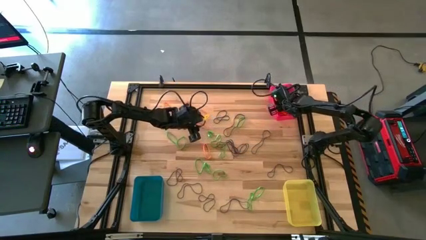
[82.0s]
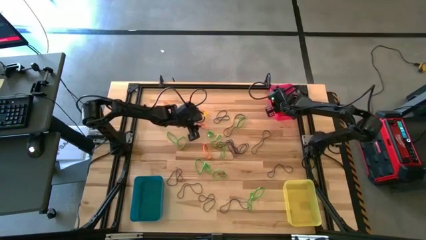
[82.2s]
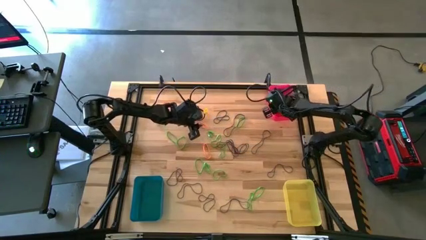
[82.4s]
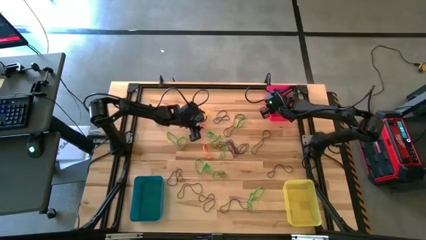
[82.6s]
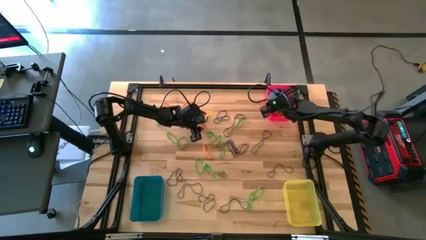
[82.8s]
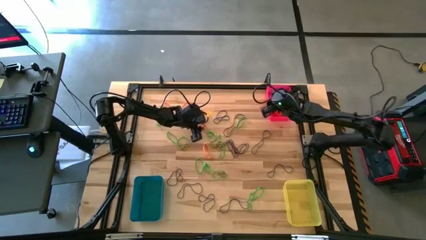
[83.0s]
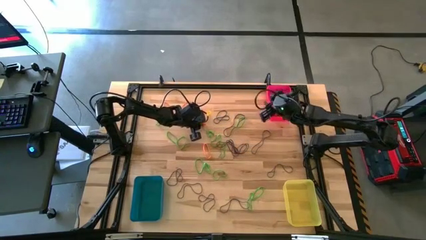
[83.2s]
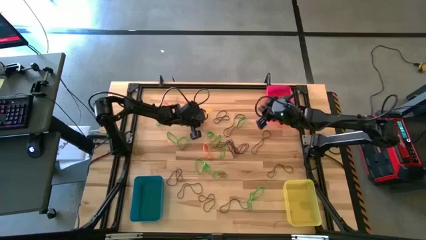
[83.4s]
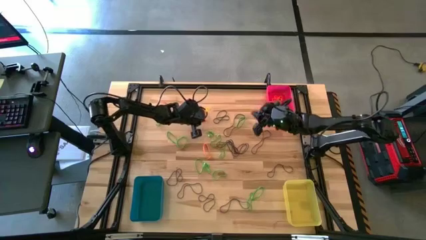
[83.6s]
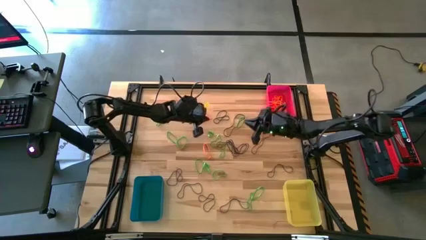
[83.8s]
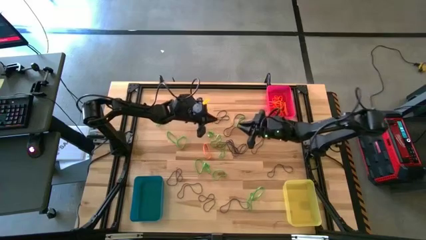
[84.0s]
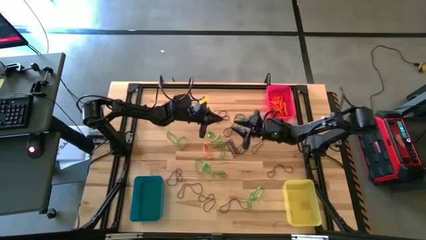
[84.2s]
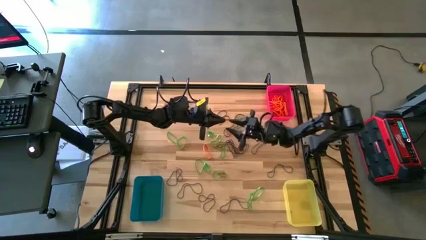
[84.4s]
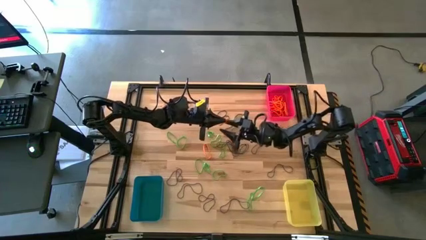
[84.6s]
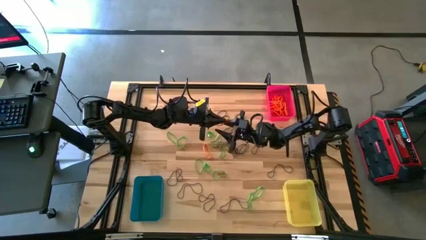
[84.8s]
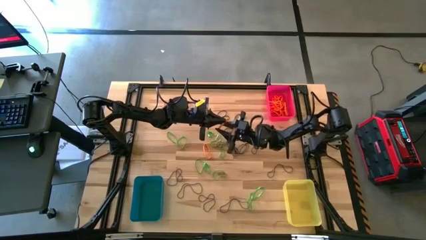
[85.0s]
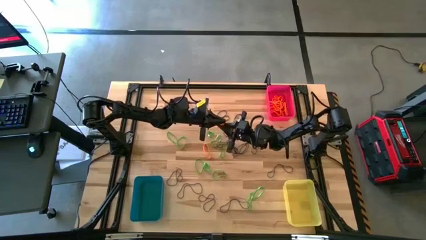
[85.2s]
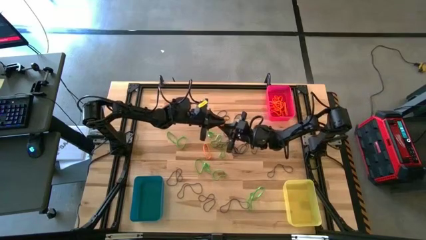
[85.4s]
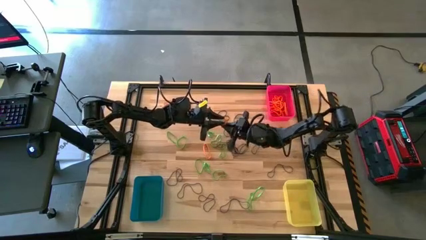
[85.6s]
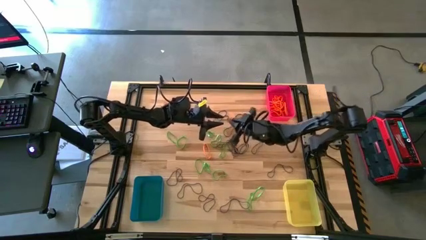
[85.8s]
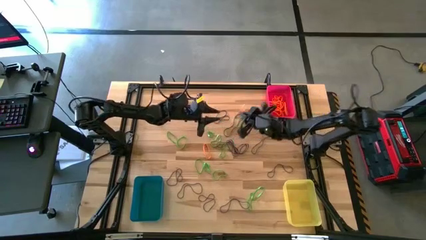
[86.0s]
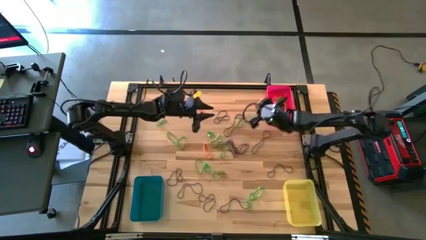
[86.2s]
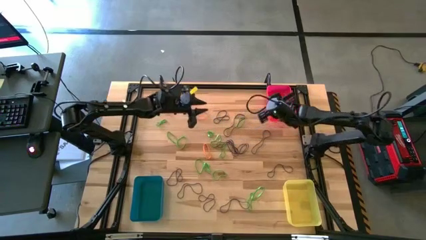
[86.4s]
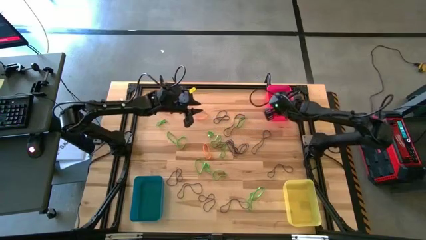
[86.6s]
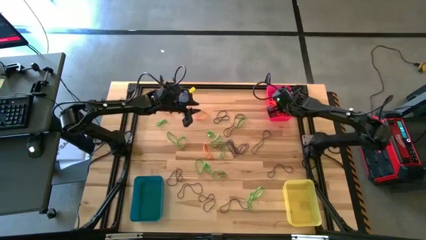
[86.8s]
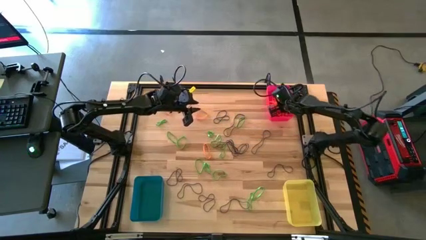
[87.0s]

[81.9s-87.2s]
Task: Sort rubber bands into baskets
Put the orange rubber band into the red bin

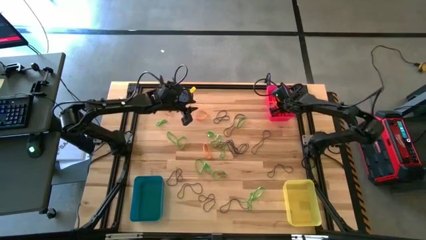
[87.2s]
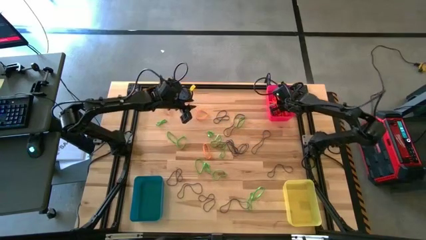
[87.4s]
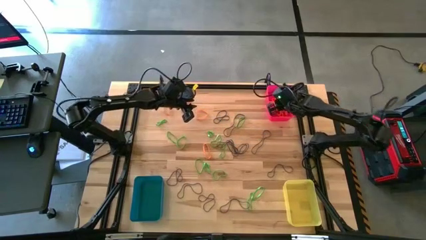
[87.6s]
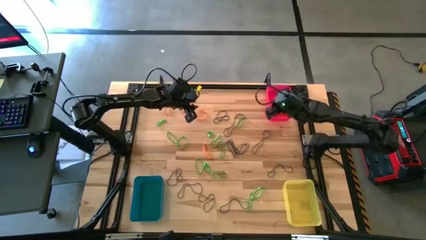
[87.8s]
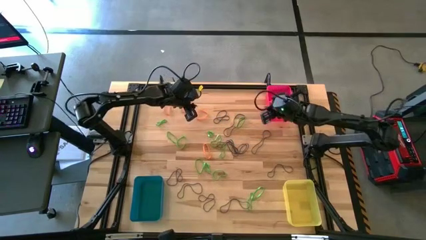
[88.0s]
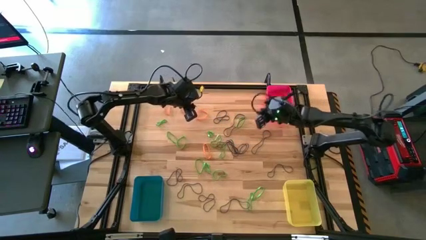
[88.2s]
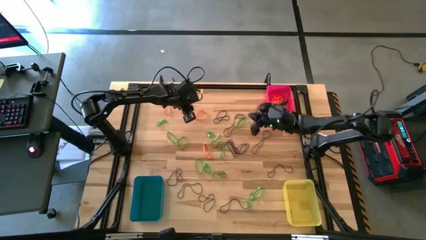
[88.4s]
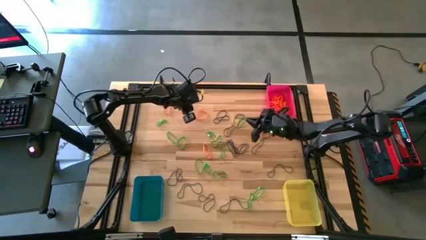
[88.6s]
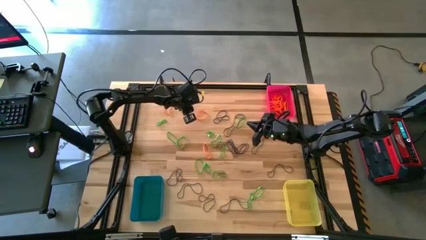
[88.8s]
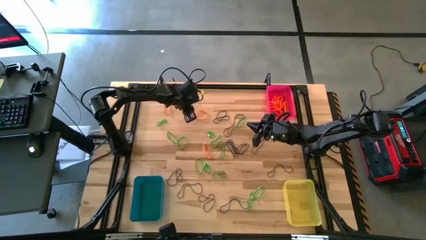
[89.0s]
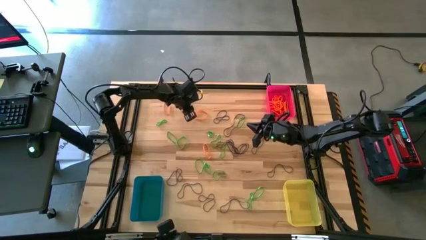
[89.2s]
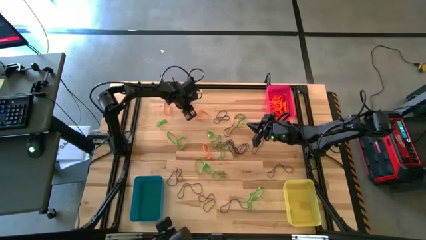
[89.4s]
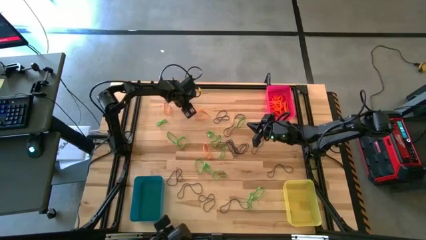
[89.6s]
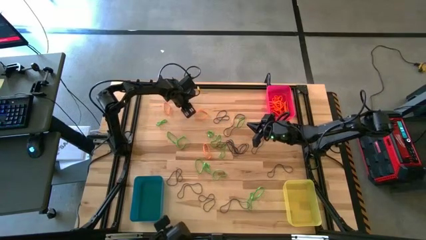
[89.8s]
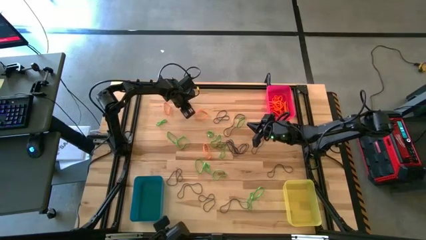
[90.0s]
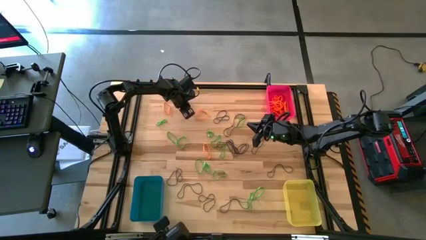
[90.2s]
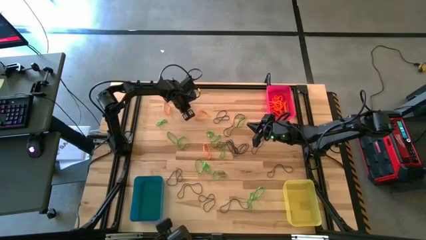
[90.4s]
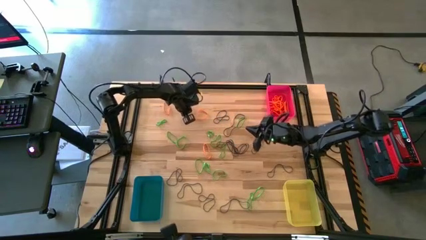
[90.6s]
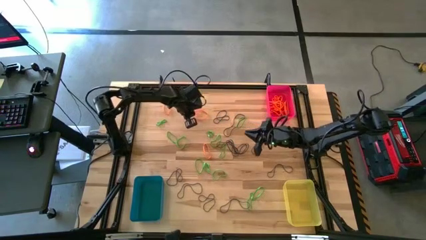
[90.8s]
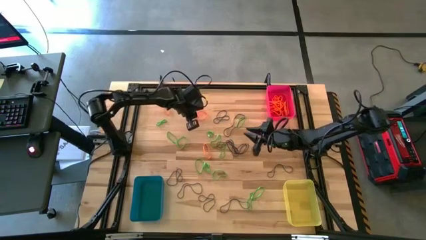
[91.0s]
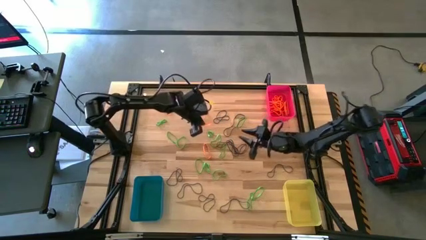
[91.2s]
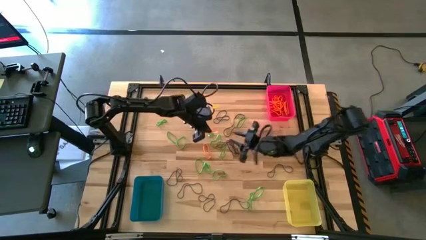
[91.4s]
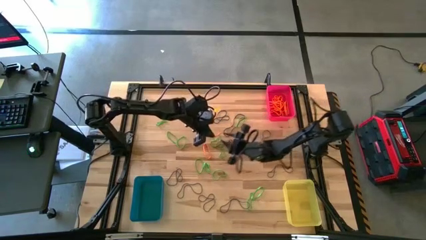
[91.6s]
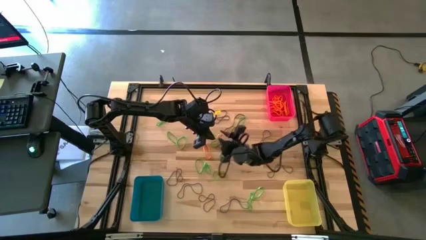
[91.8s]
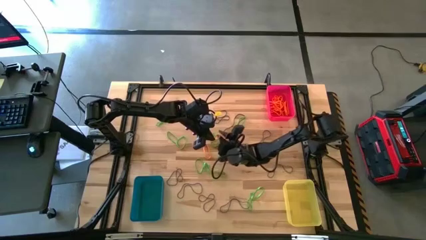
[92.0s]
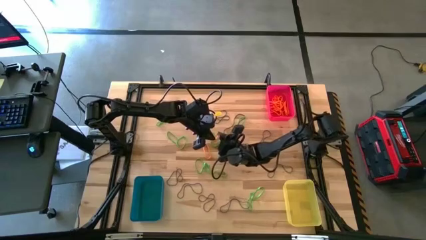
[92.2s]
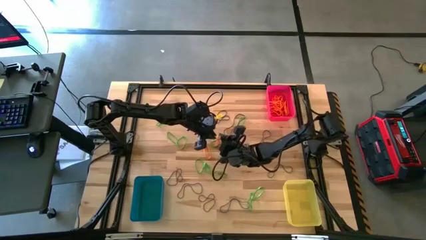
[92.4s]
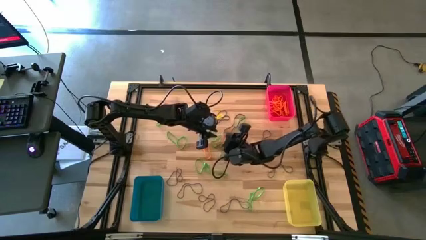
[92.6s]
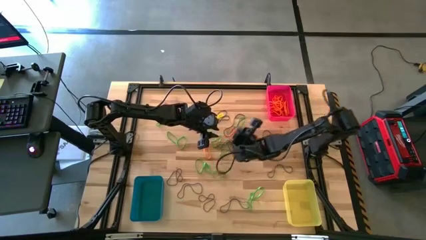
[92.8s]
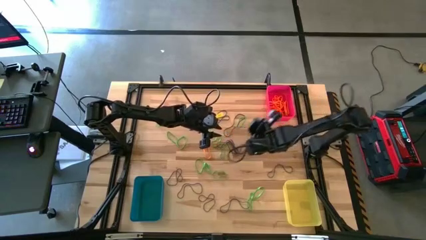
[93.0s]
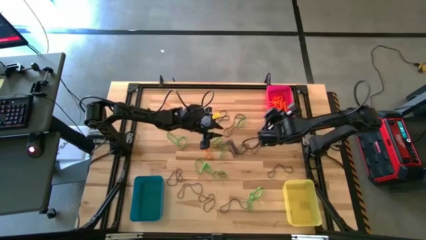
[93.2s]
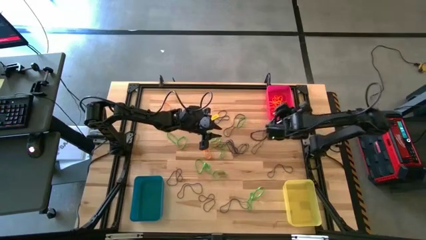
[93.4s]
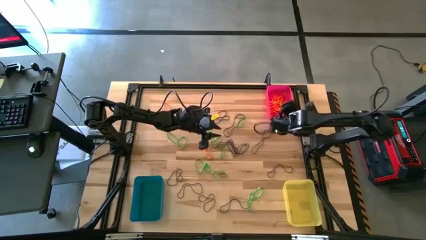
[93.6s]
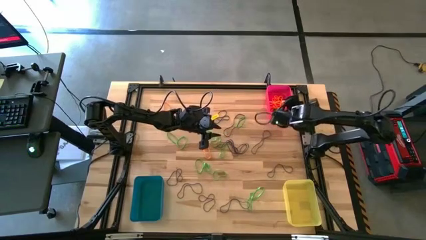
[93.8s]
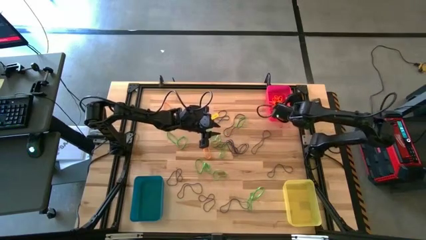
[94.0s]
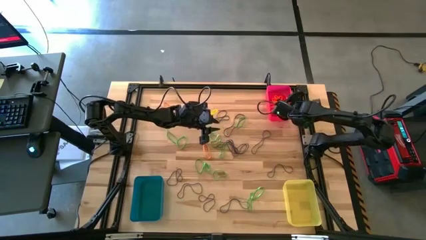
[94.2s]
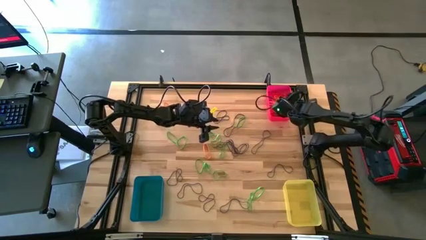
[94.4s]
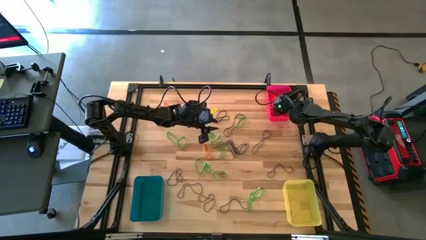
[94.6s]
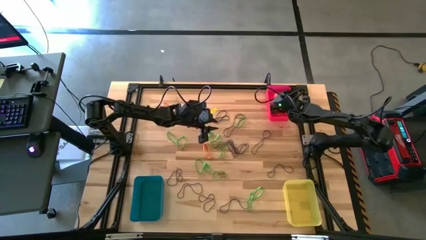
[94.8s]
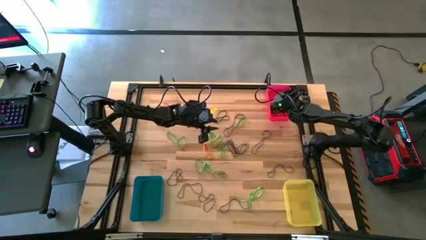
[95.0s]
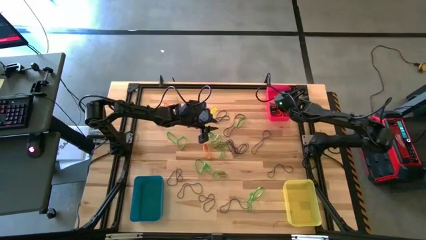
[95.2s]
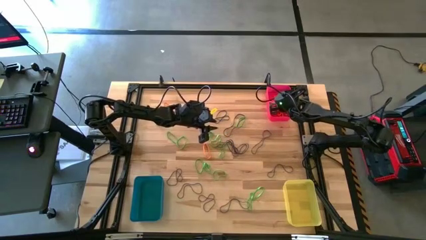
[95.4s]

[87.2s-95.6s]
Put the orange rubber band into the red bin

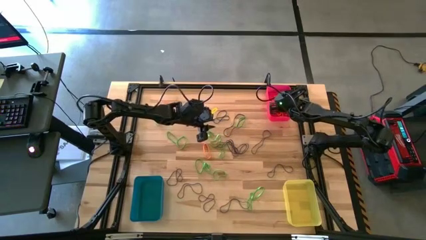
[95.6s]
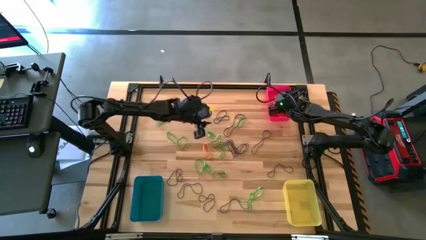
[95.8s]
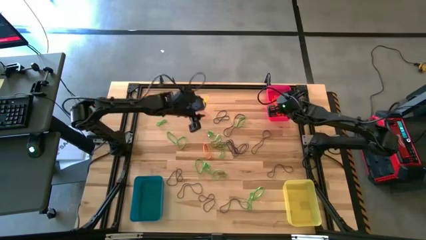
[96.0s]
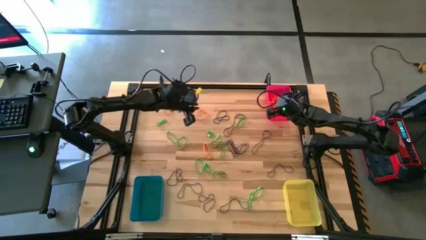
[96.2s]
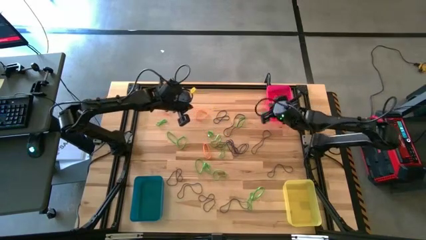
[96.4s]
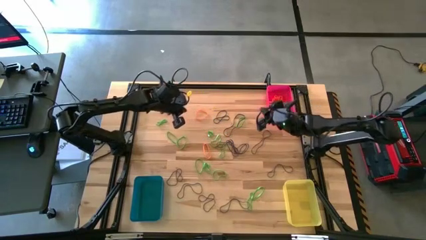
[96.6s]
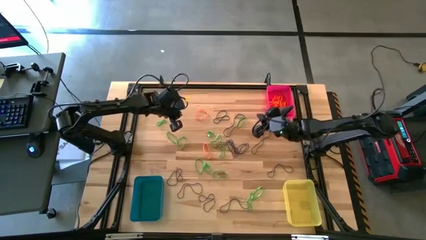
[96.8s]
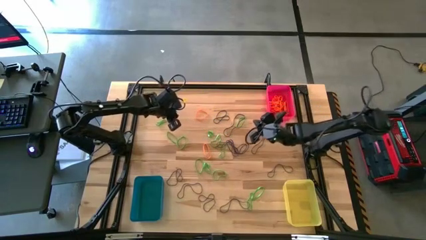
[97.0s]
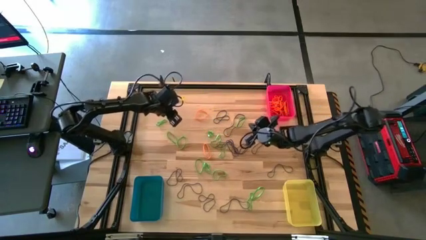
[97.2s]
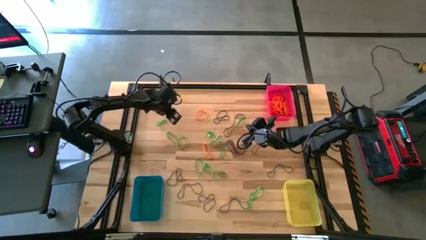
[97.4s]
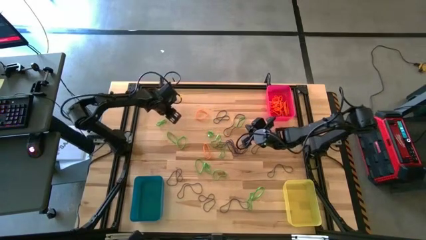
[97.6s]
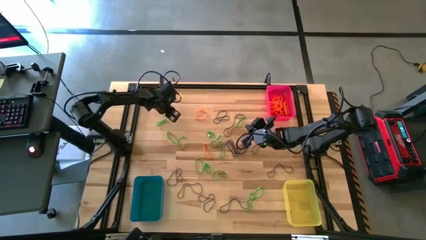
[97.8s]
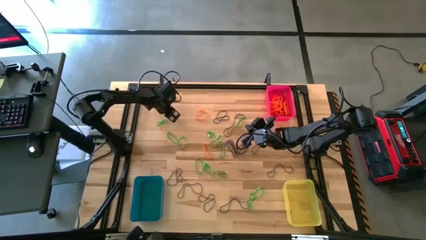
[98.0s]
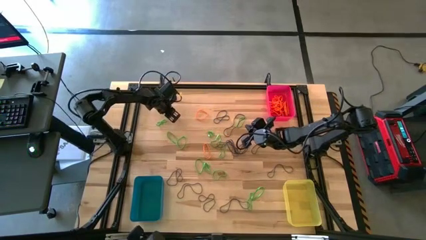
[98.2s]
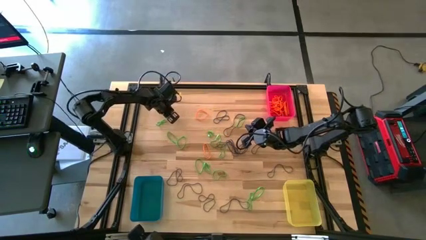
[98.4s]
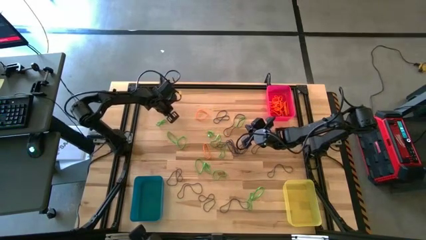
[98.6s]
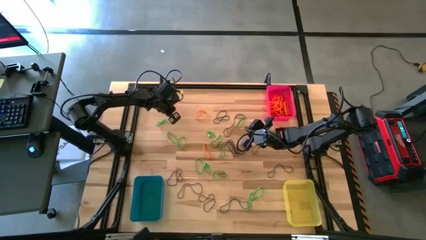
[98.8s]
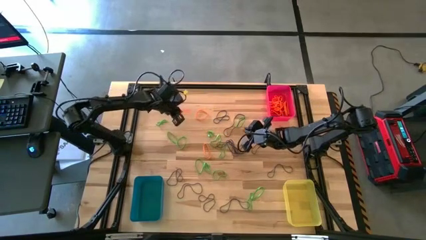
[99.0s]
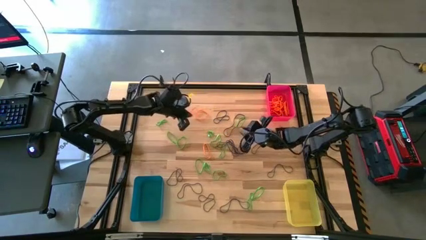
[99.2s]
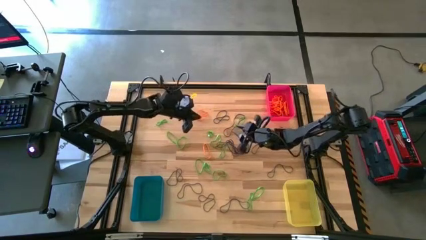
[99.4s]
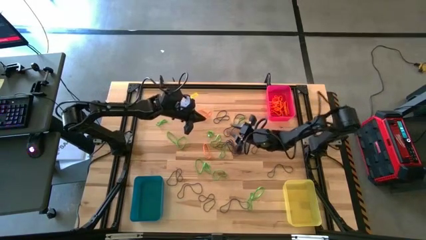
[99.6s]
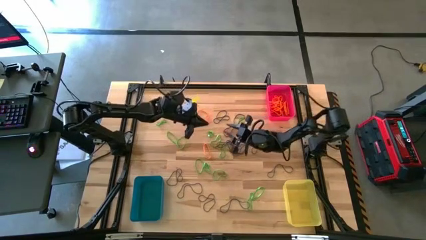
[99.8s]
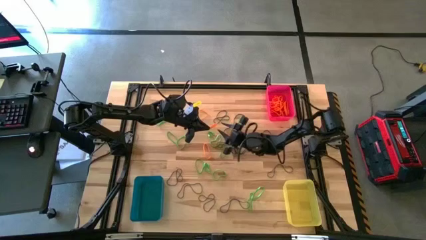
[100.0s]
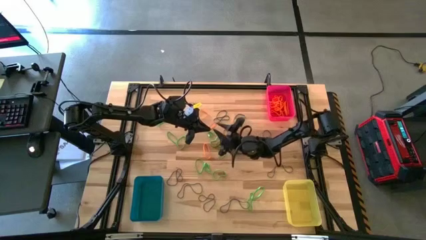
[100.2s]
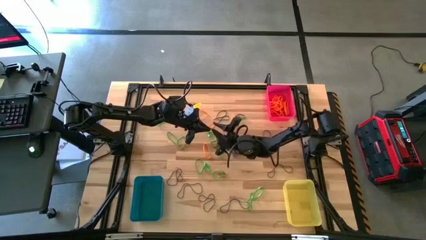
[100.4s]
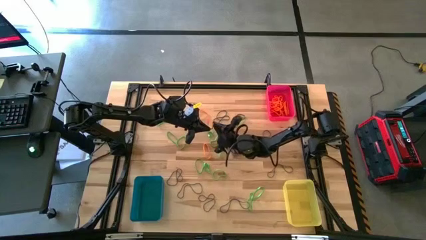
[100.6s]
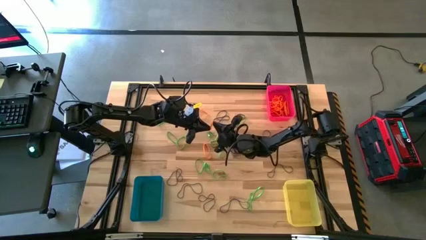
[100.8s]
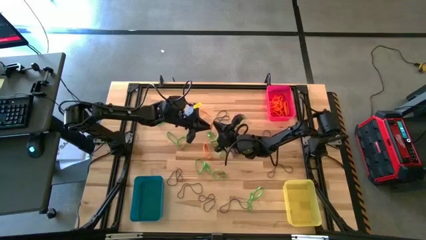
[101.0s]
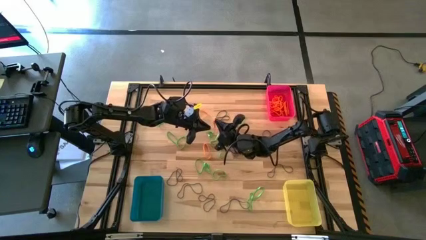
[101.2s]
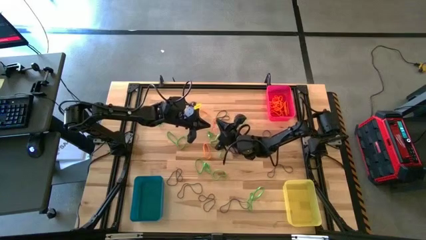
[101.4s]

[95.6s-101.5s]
Put the orange rubber band into the red bin
